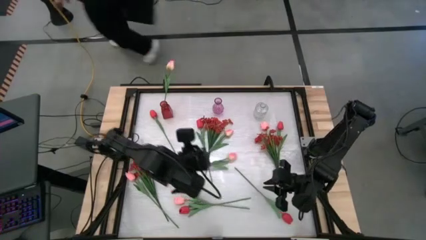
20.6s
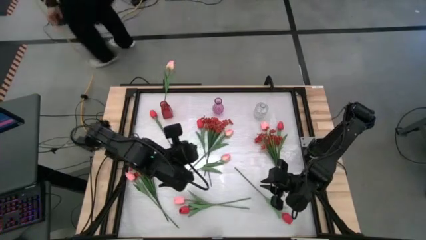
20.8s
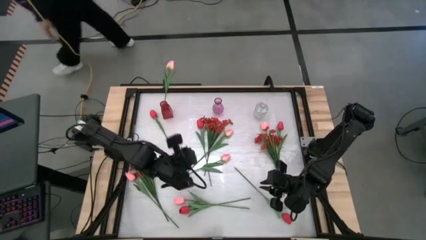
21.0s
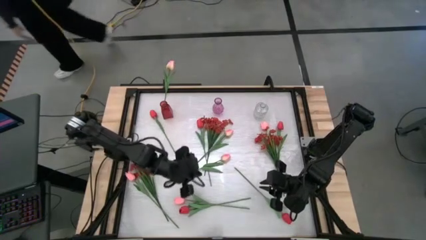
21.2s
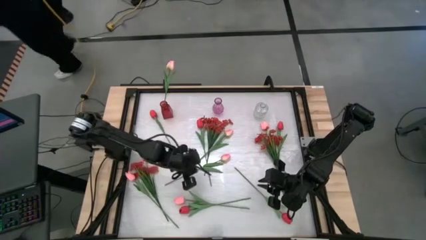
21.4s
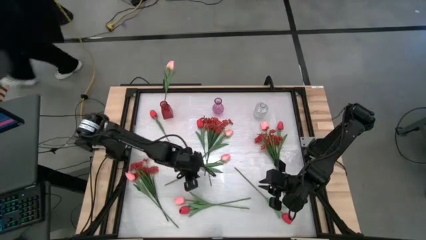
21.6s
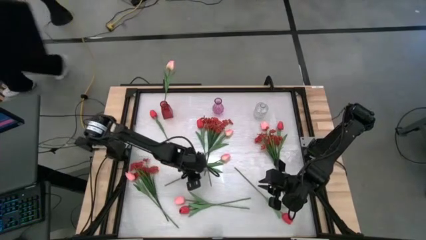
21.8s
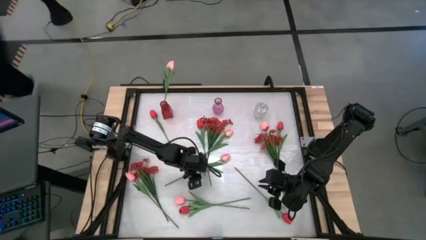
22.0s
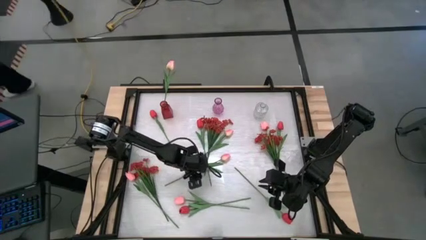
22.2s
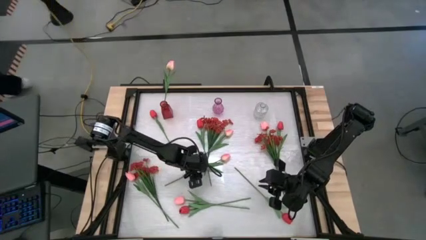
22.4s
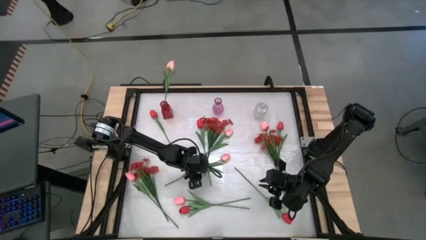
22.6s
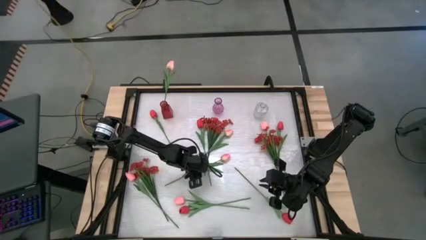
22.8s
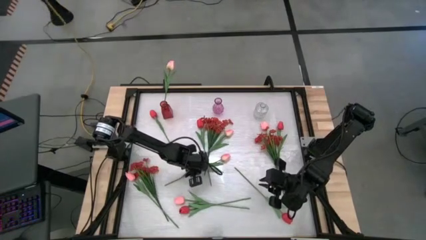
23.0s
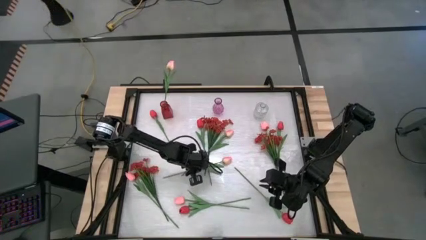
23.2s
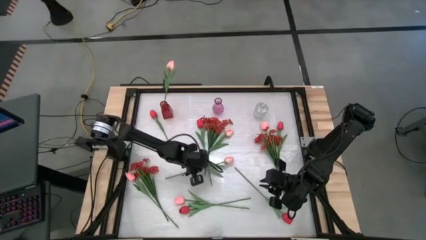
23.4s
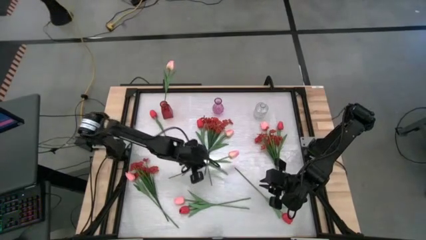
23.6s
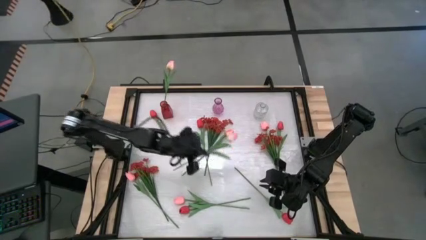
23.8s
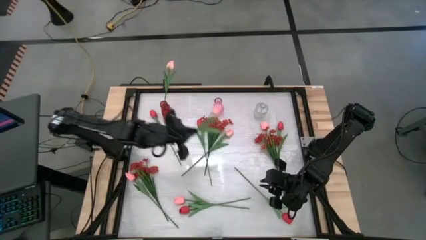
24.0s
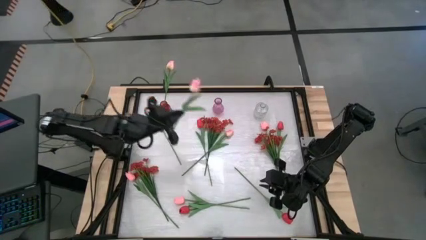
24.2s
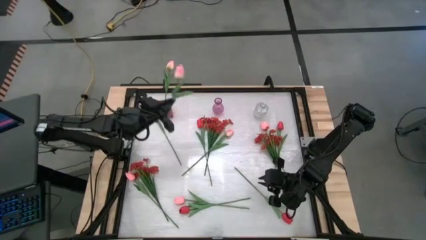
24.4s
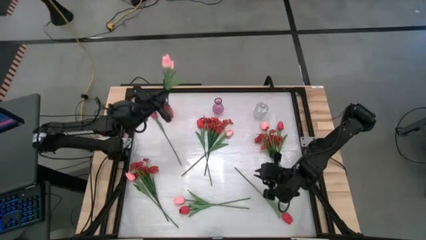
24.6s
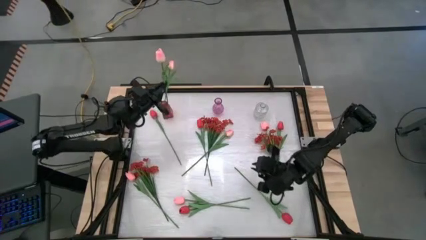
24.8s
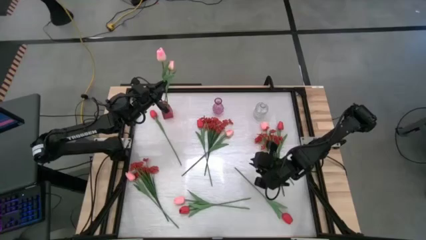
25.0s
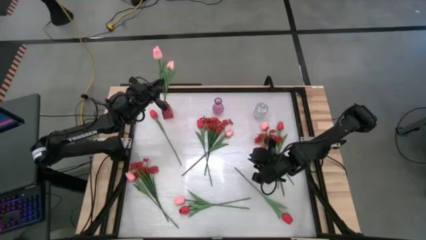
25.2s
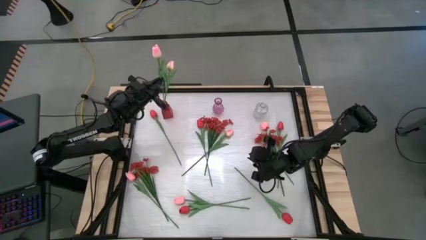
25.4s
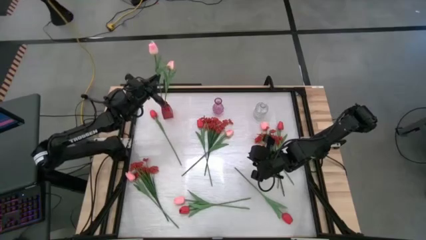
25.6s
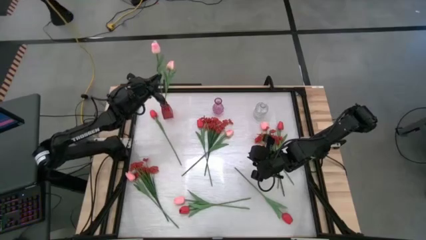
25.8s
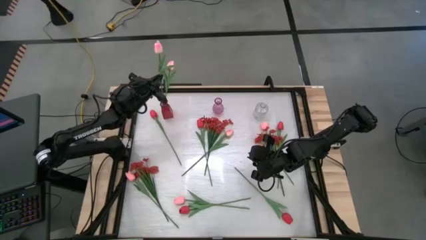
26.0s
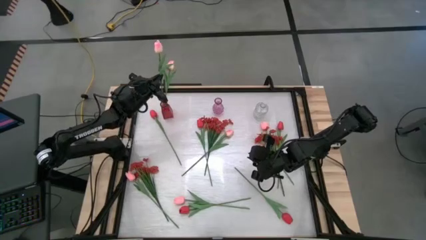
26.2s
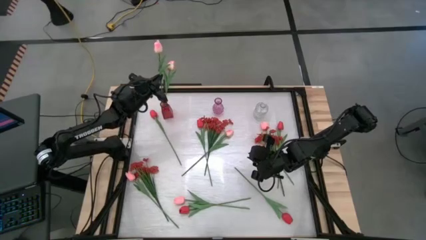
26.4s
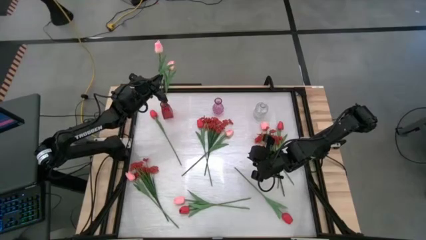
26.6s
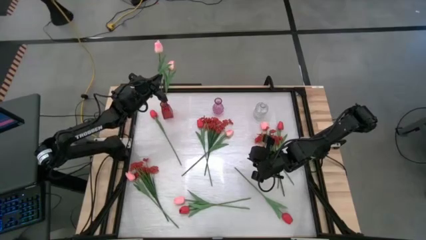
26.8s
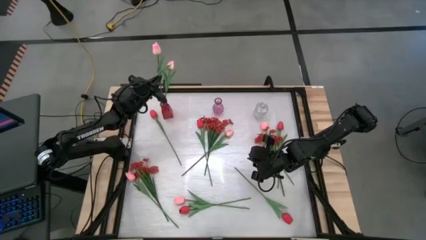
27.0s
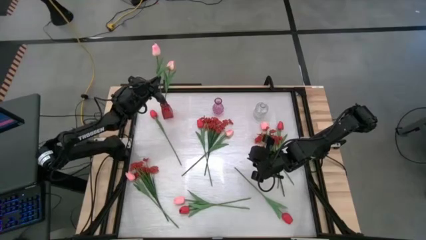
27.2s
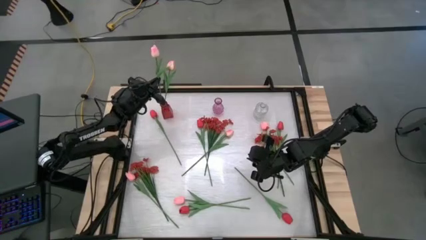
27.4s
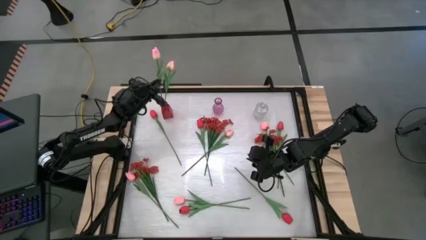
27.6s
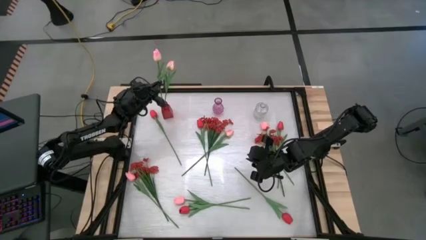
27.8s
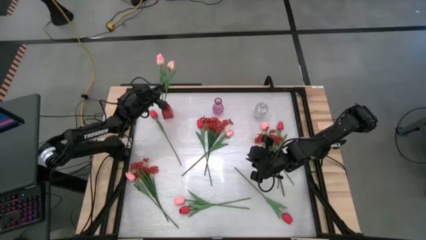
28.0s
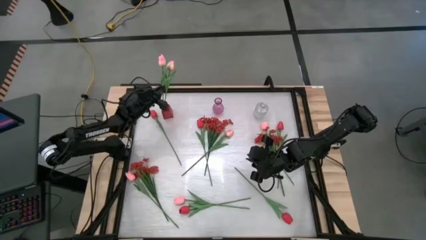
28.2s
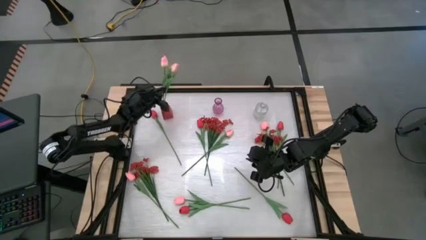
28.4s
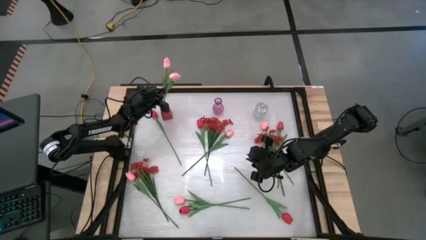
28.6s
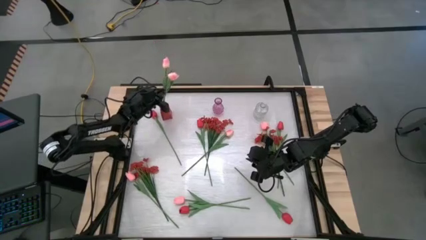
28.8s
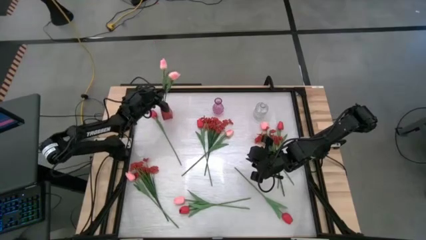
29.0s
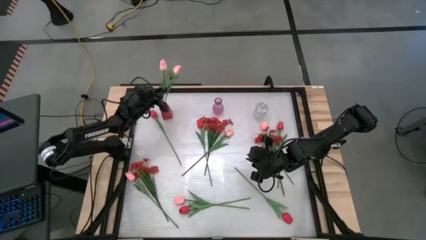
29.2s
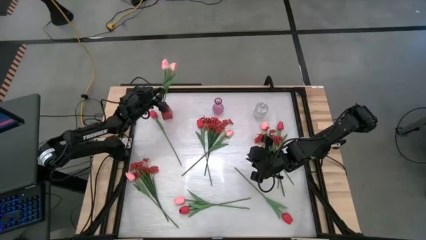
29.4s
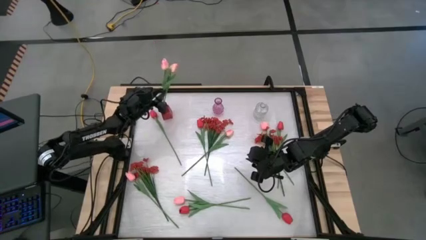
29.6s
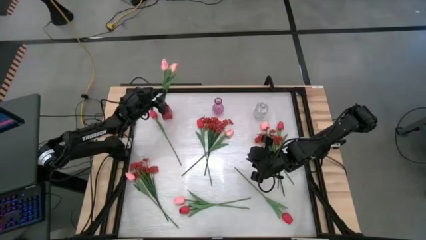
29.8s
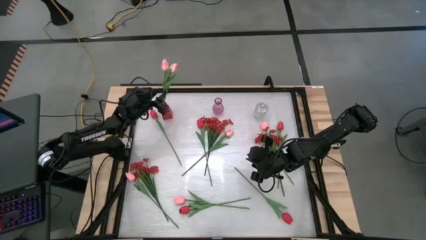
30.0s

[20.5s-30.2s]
Task: Sort flowers into vase by color
Put the pink tulip into the red vase

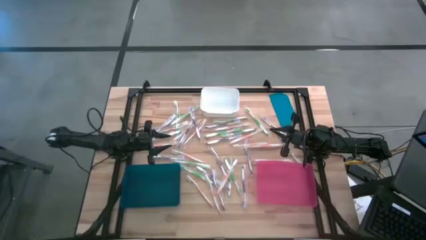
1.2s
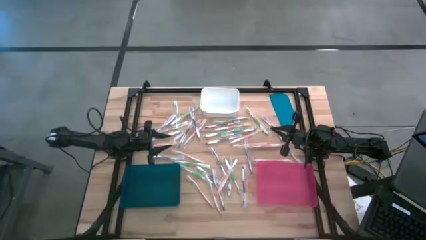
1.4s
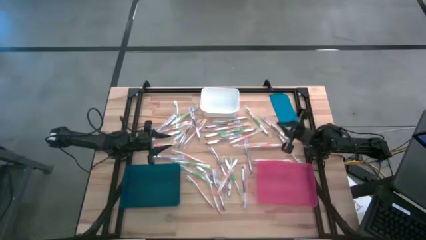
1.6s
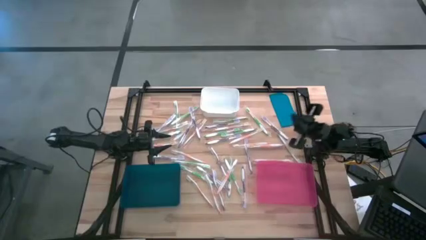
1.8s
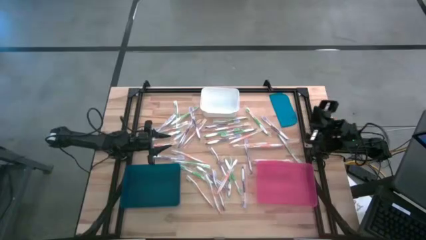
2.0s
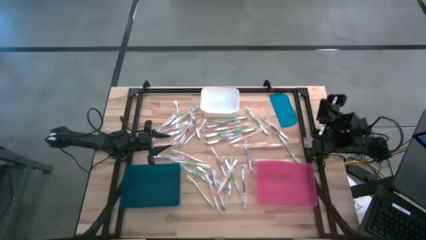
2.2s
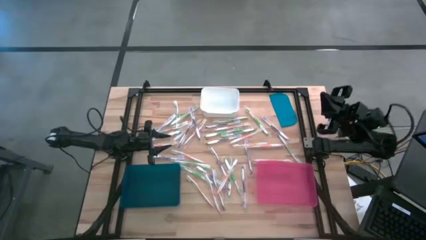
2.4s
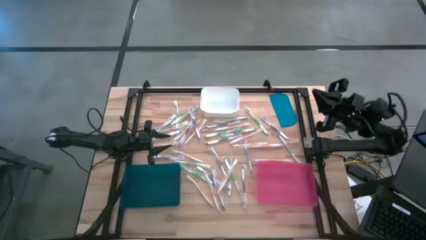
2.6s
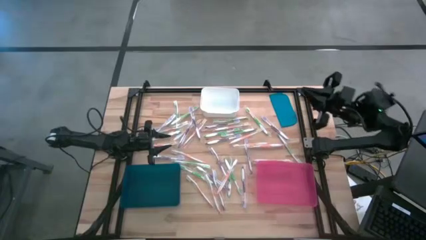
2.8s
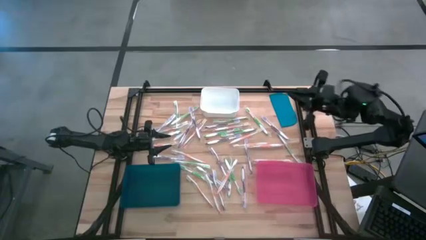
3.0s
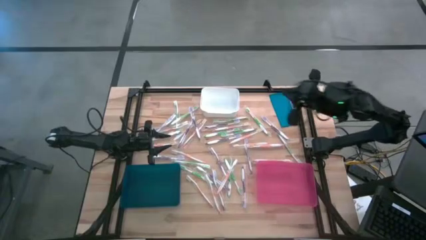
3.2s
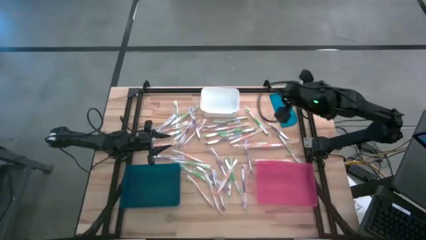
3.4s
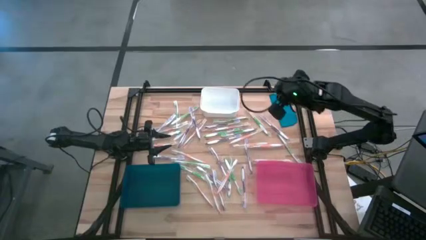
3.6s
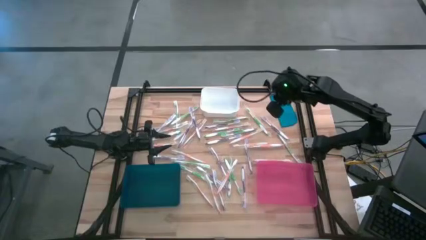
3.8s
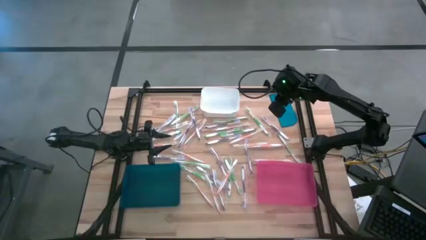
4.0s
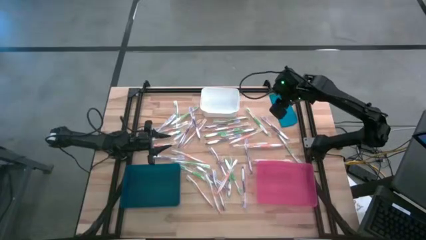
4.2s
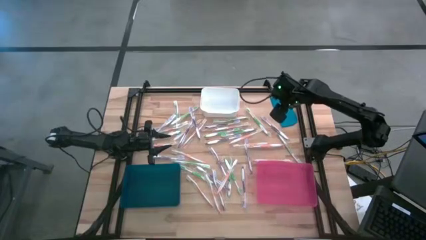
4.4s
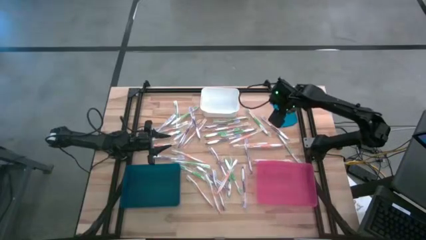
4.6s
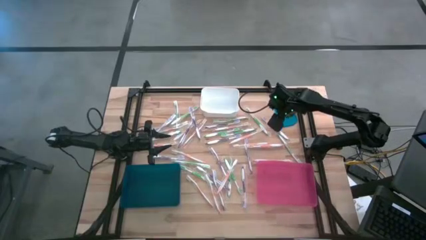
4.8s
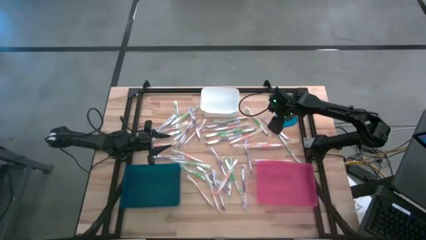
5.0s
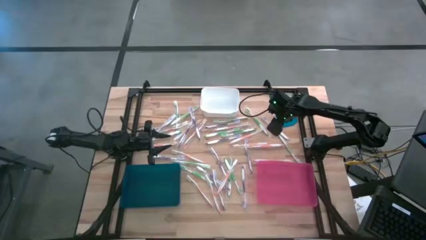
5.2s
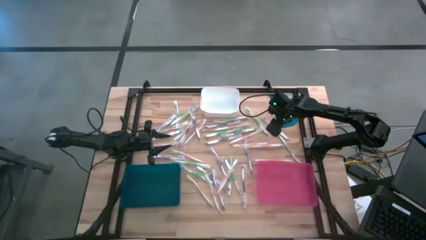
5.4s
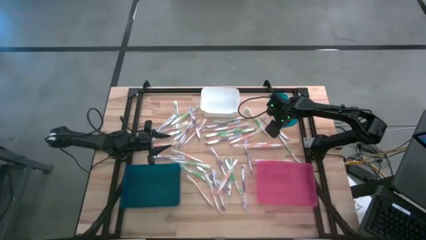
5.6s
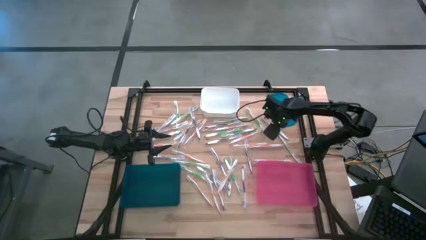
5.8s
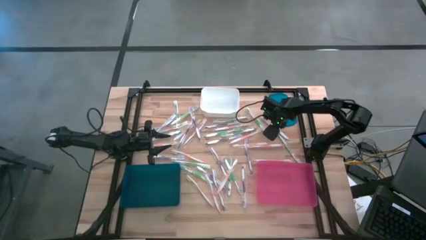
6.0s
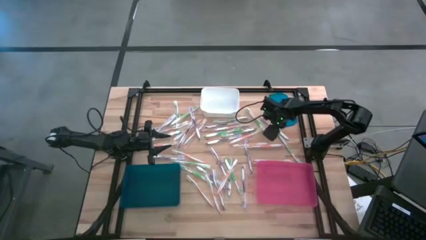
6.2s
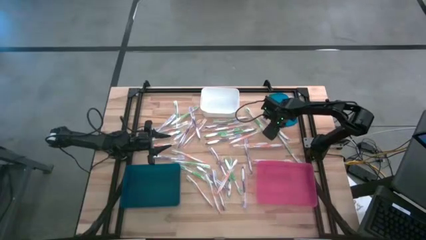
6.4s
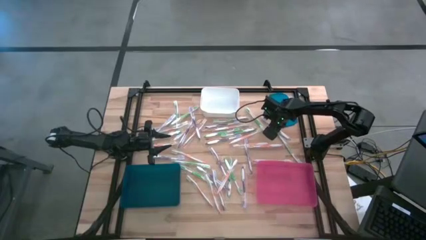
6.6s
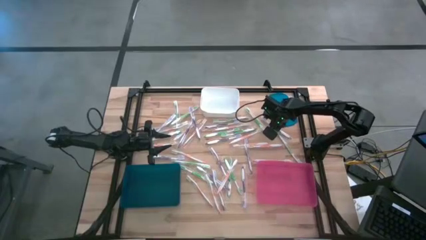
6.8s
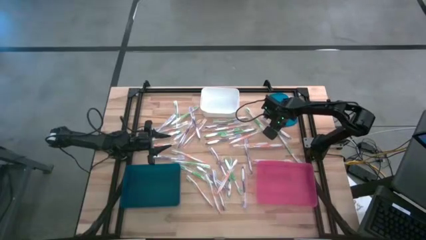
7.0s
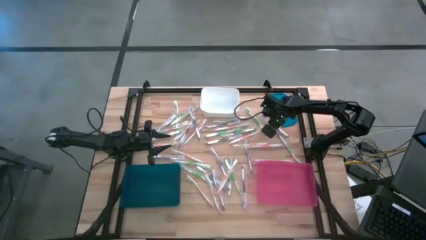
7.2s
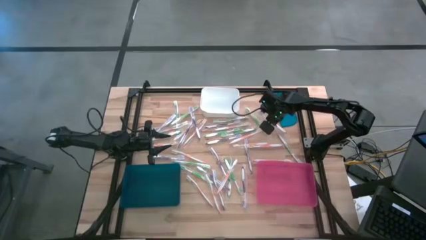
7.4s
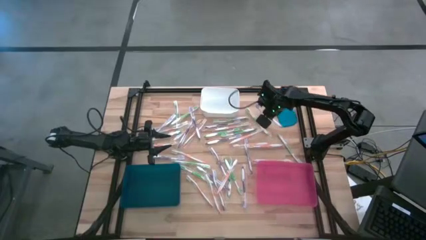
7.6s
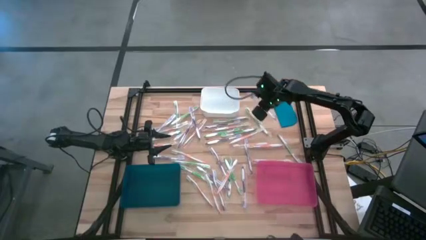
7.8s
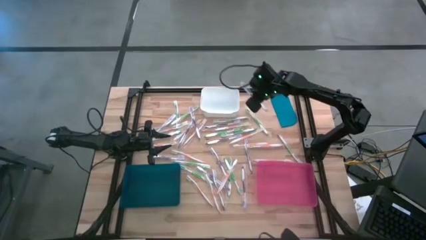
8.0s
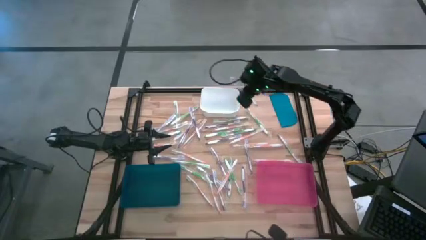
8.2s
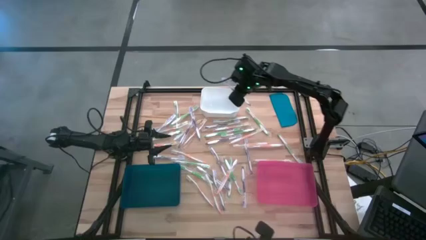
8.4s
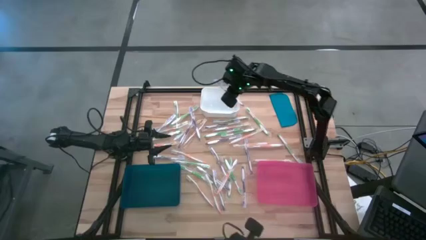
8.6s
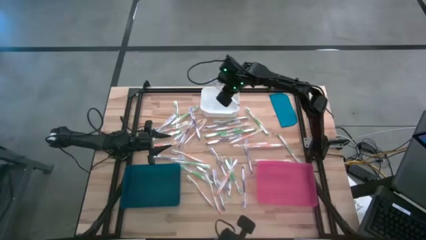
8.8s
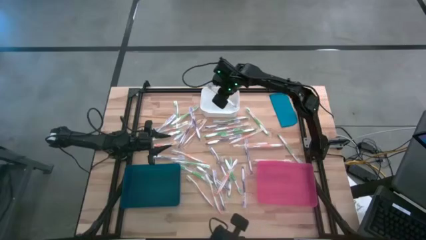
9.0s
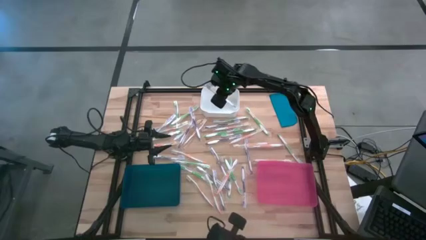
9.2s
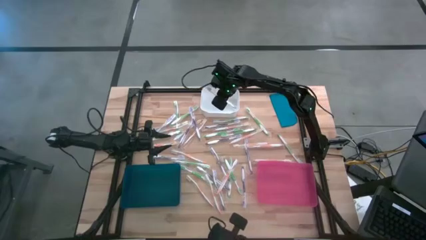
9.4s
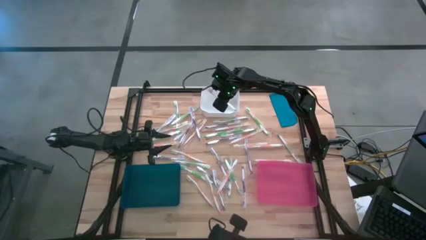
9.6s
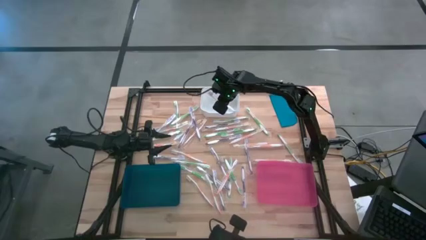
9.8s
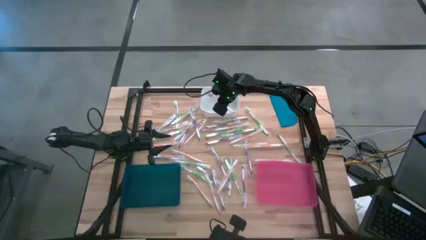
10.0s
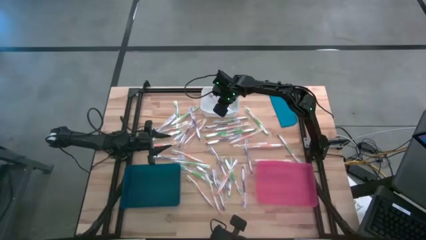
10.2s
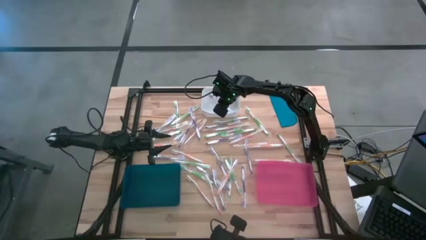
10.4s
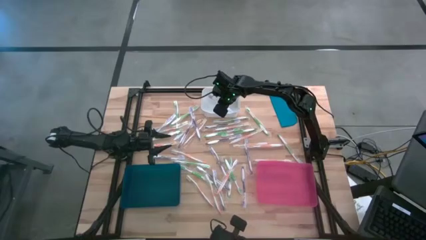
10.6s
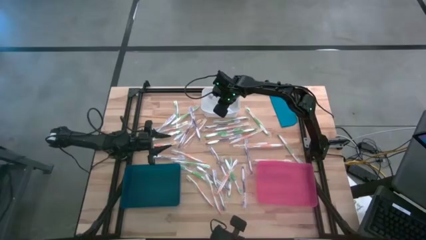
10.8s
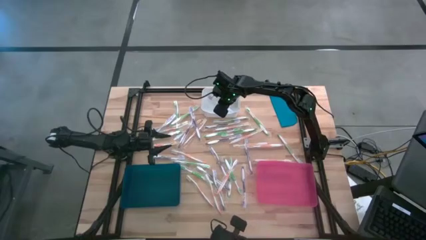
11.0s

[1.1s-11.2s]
Task: Pick & Place Toothbrushes
Put the violet toothbrush into the white bin
